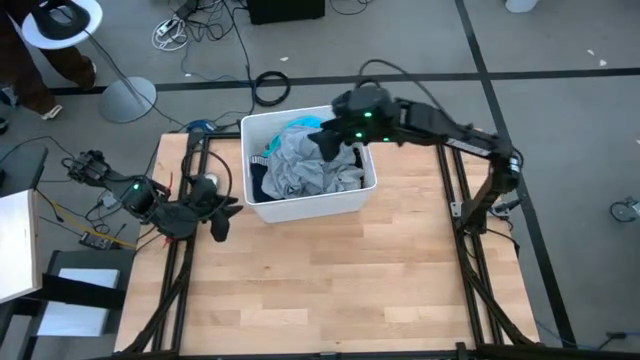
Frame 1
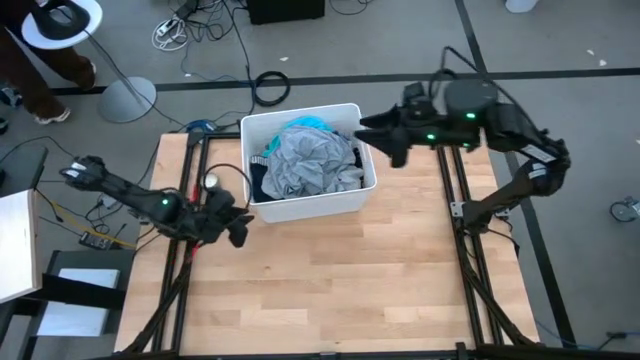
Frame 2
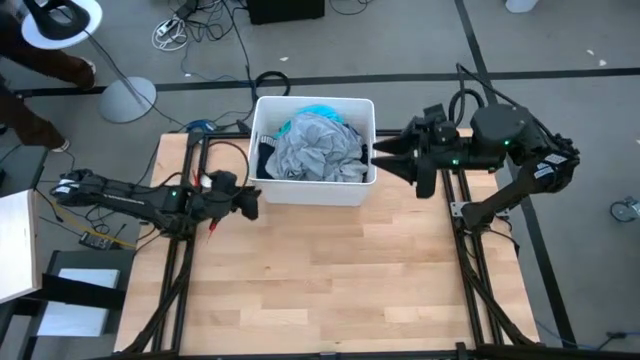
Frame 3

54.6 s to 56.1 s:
Task: Sort clothes
Adjust the white bin

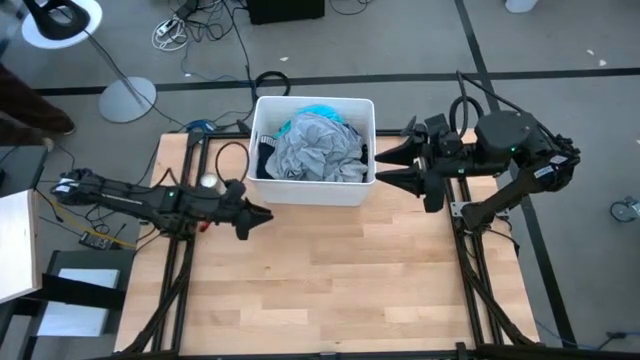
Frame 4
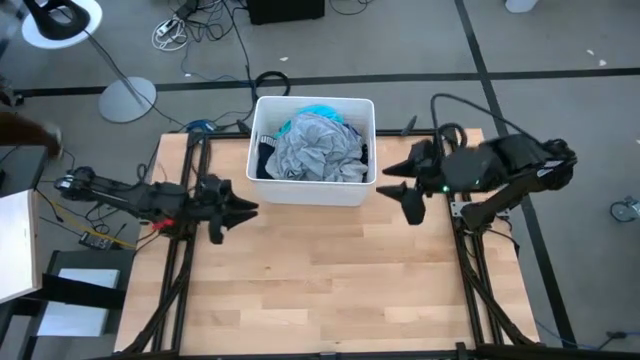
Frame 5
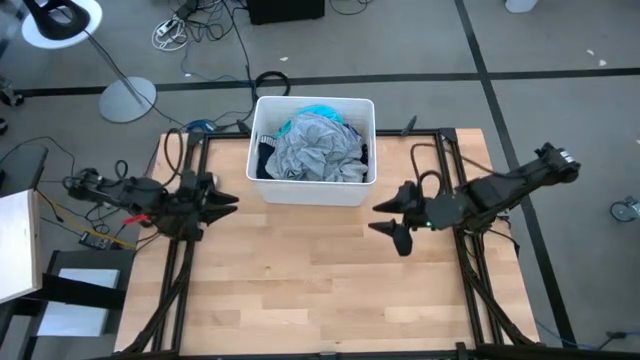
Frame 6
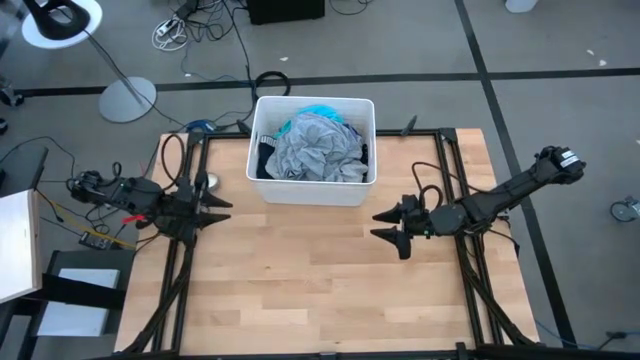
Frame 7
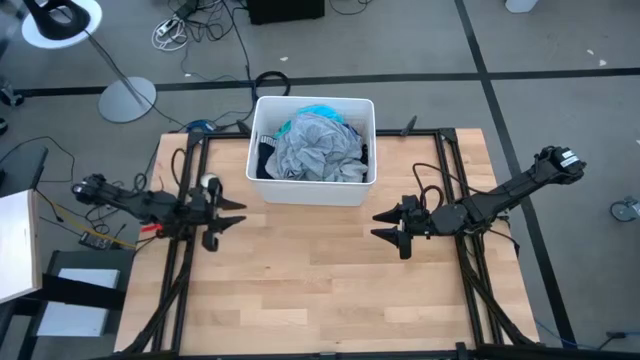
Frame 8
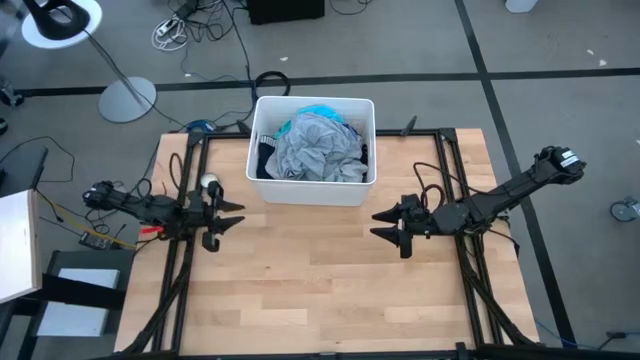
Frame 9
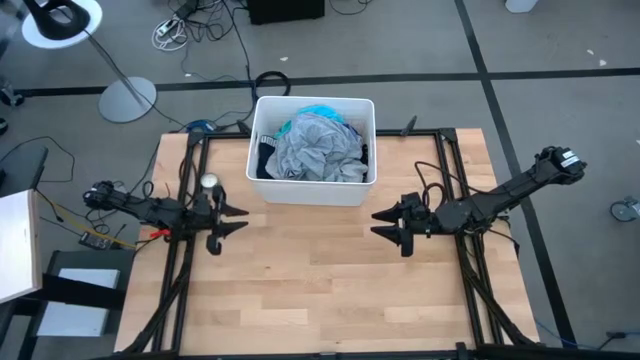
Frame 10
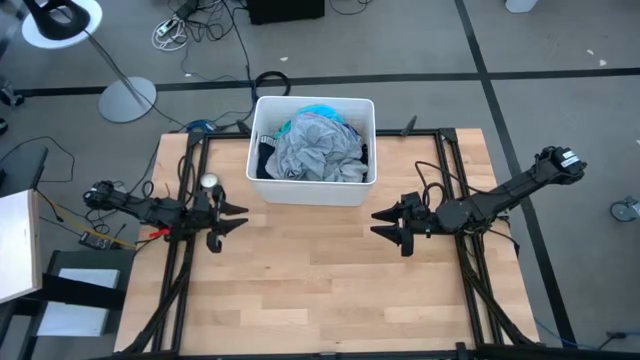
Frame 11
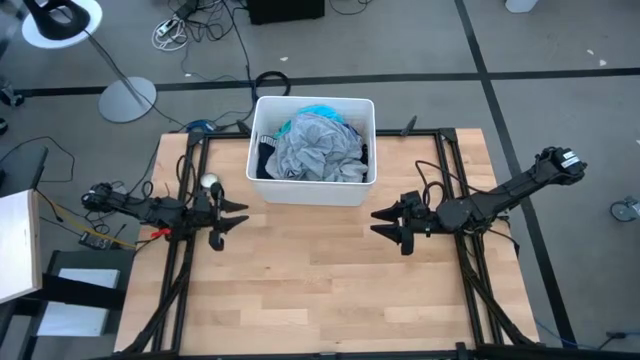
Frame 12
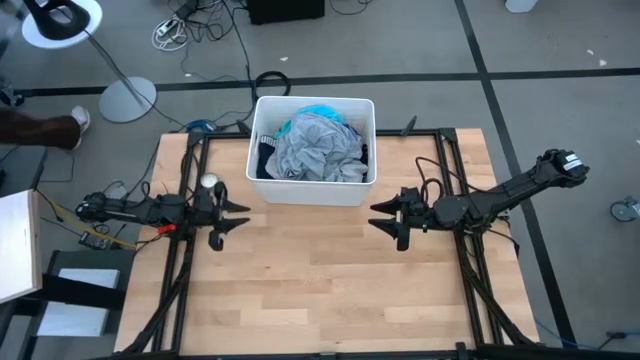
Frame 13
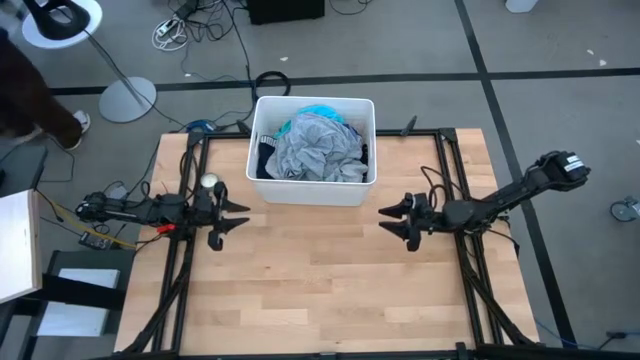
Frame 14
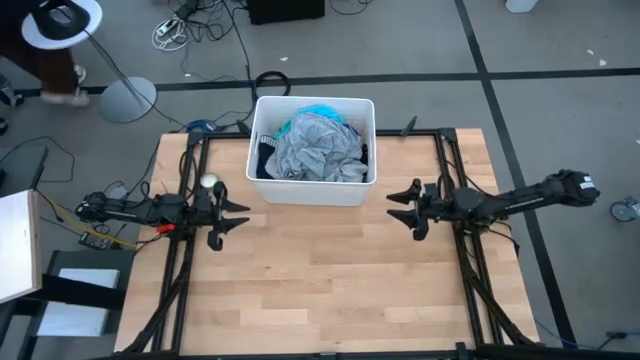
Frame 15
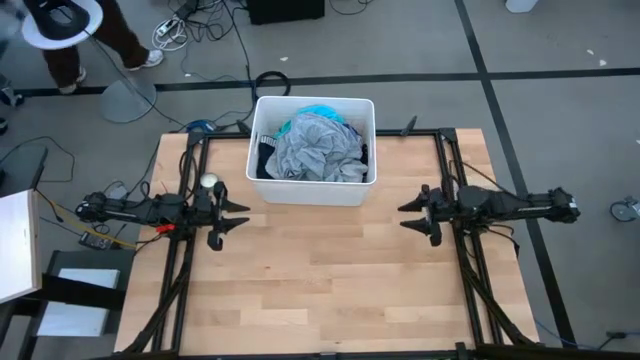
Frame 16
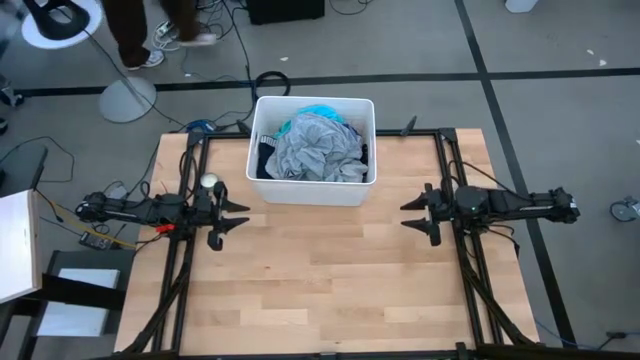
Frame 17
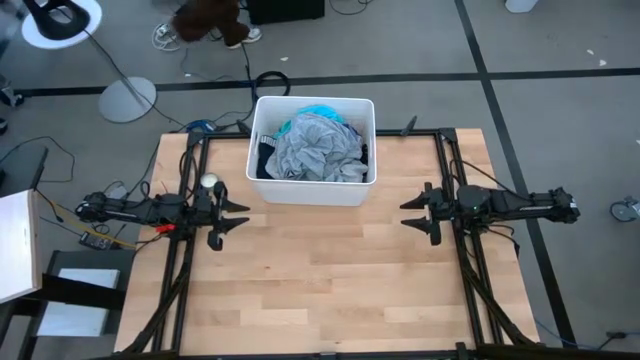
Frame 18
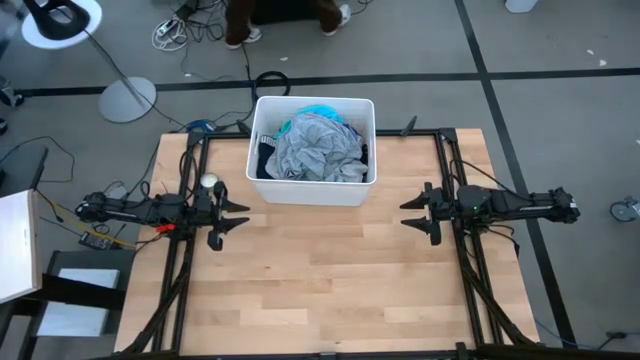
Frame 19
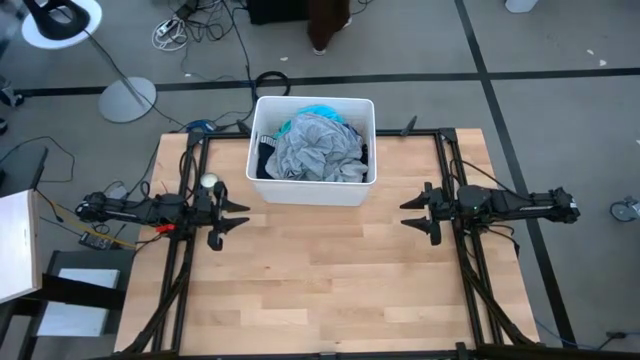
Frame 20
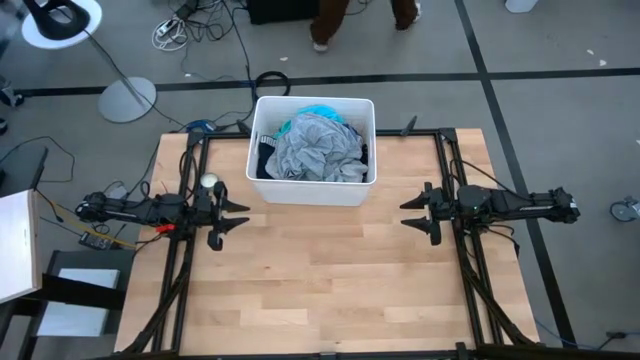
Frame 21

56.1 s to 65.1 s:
Return to Home Position

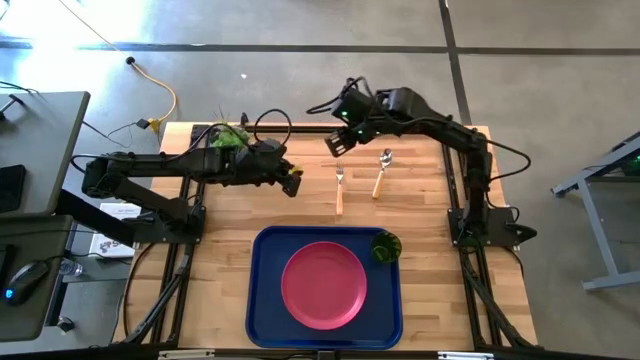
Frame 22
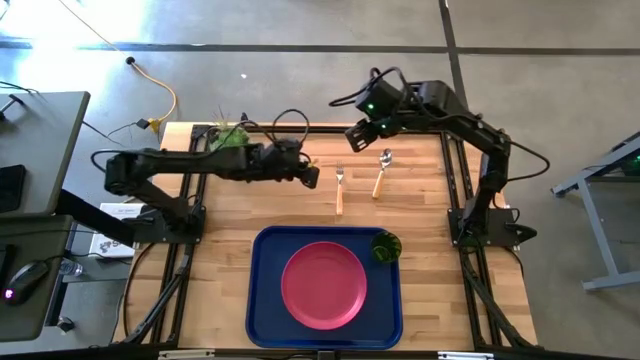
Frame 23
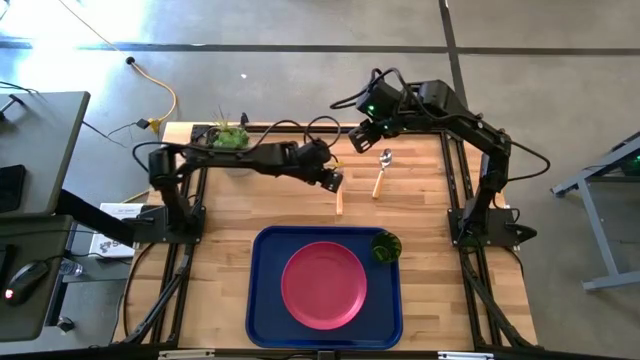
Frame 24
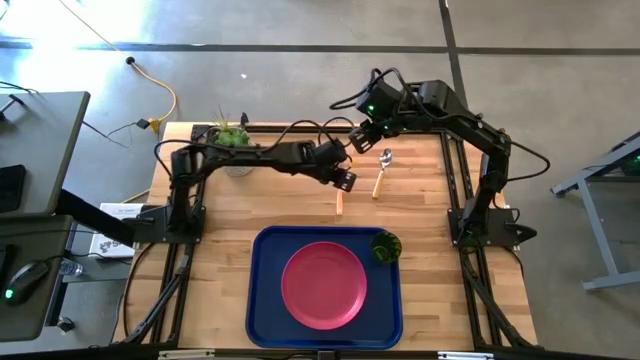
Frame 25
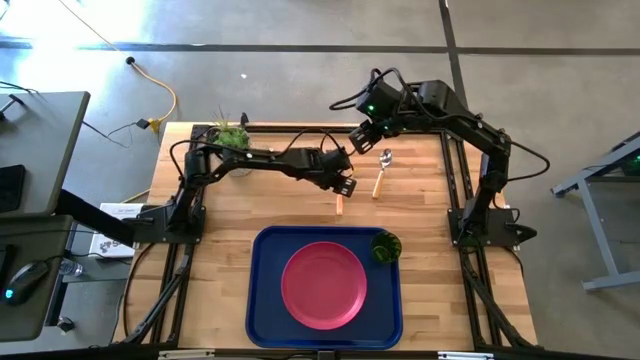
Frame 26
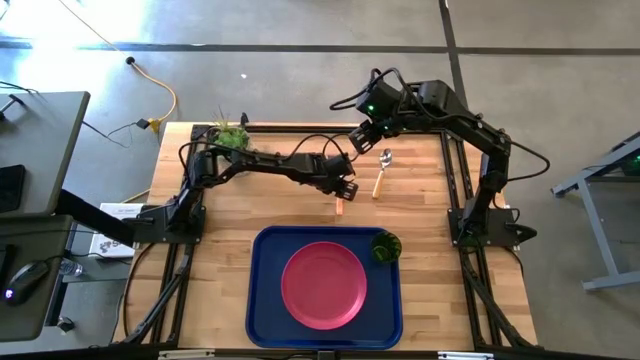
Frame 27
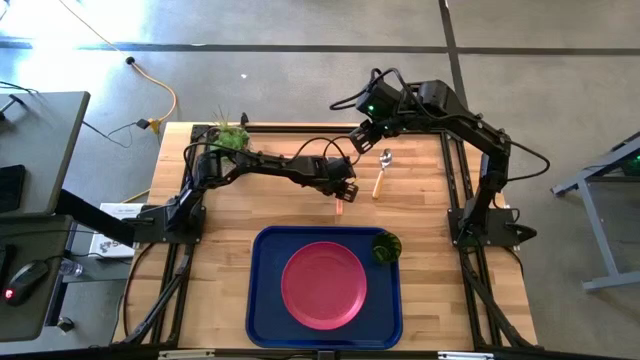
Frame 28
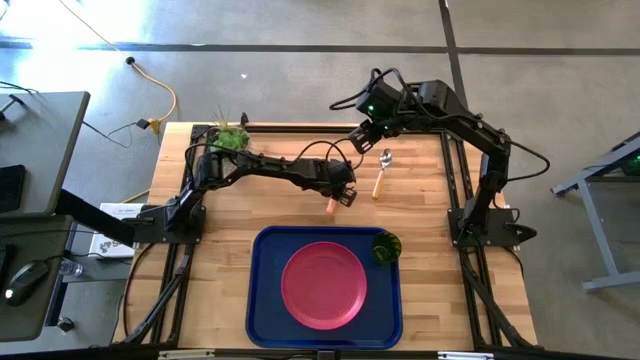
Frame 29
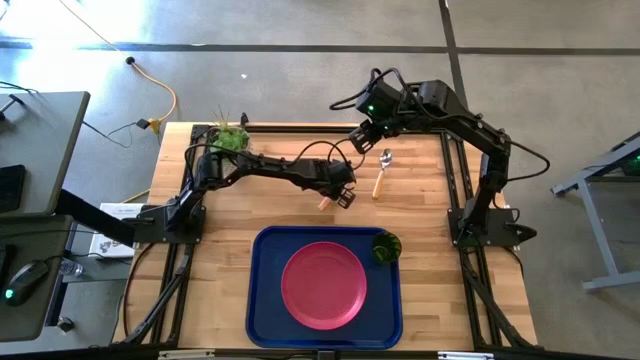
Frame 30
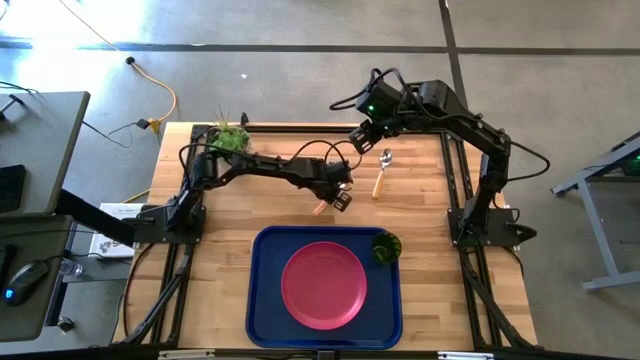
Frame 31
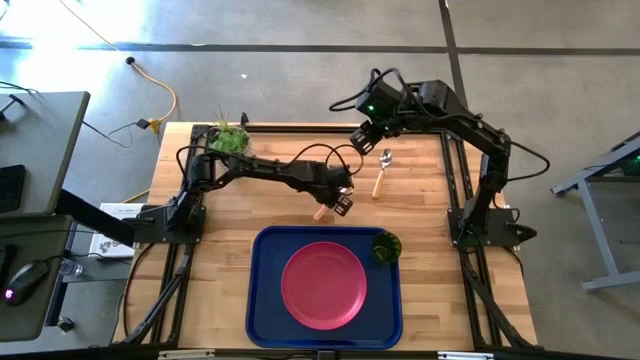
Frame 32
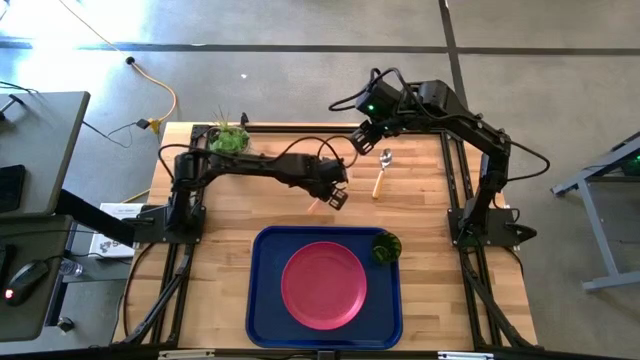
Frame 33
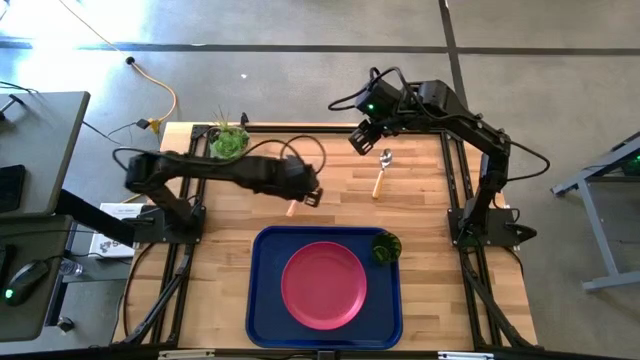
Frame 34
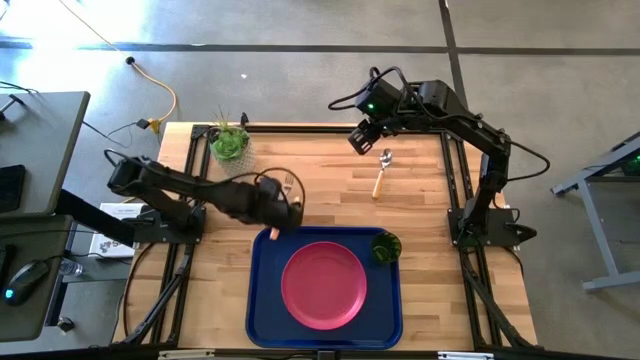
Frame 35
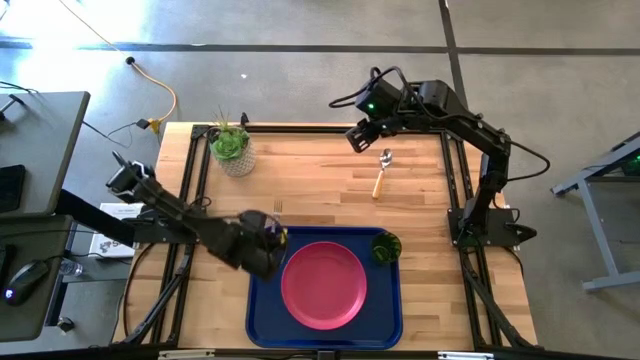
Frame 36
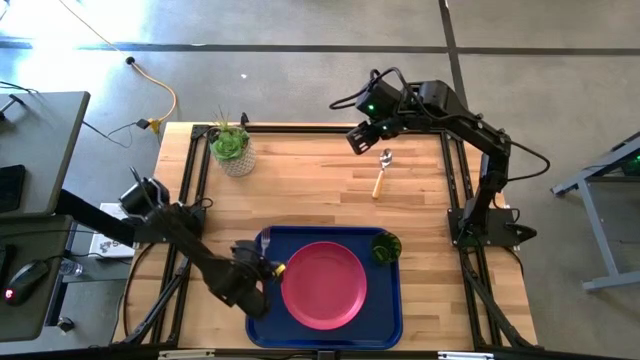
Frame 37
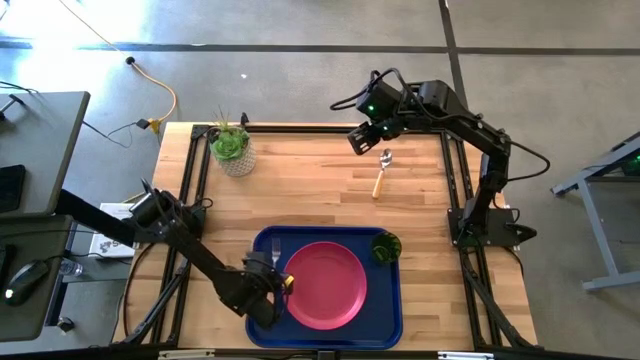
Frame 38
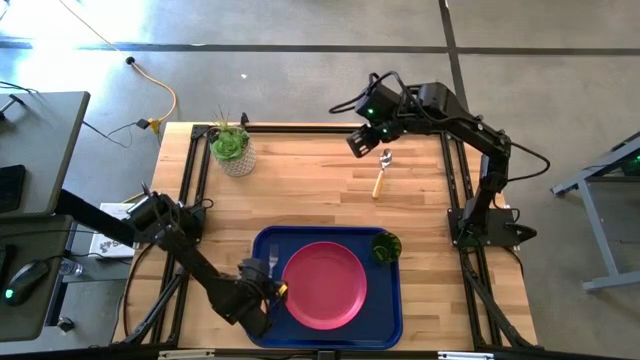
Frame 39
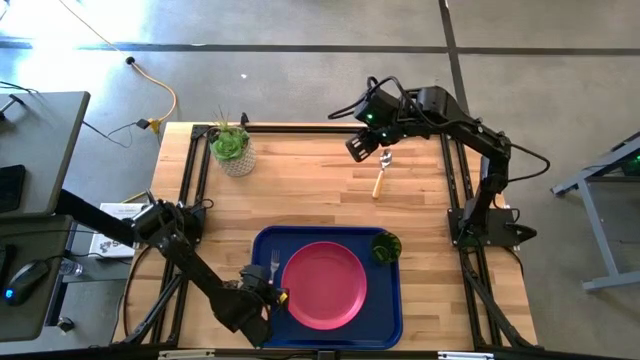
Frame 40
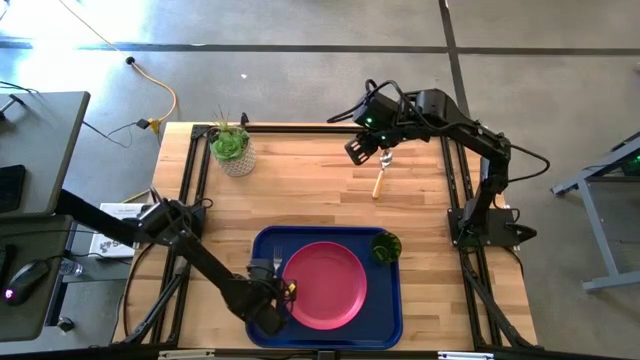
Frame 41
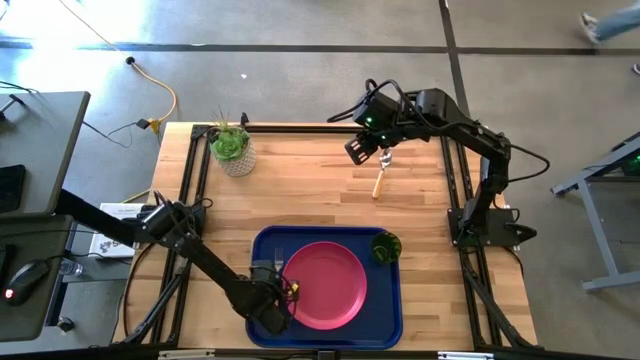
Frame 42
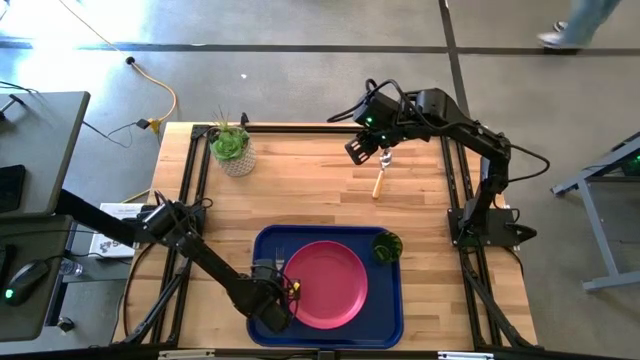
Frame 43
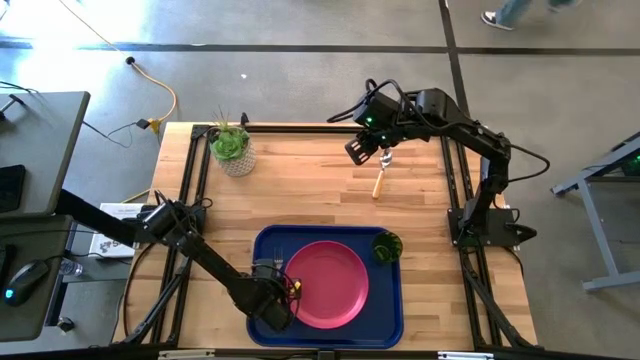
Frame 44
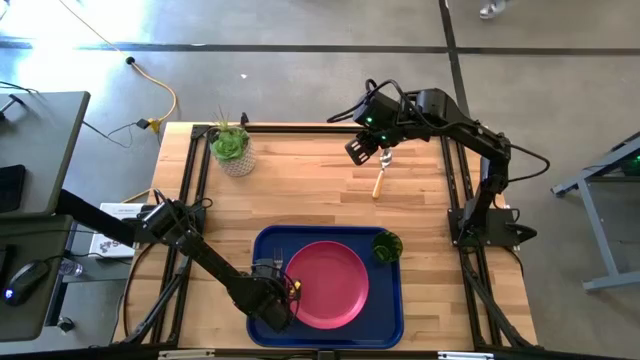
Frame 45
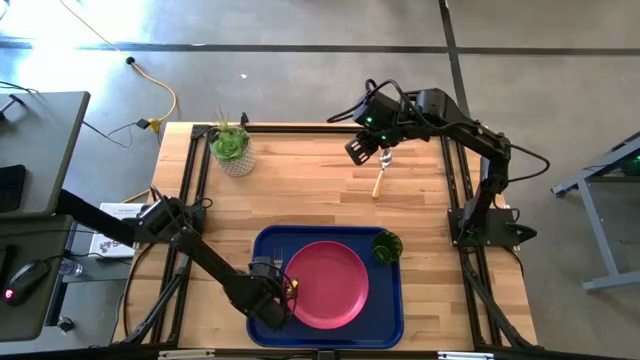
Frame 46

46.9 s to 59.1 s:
Task: Pick and place plate/cup/fork/spoon on tray
Put the yellow fork on the blue tray to the left side of the pink plate
